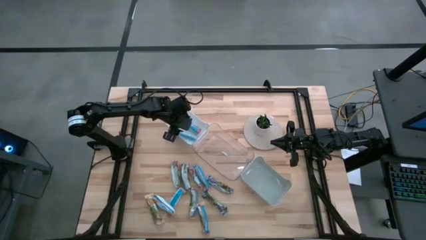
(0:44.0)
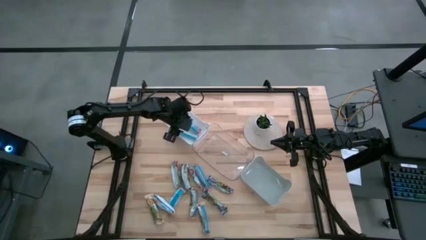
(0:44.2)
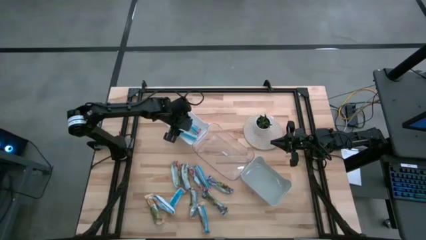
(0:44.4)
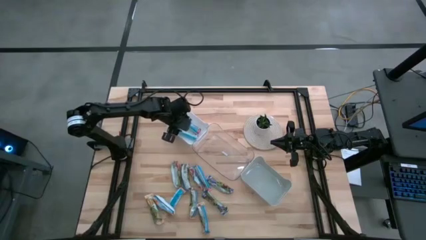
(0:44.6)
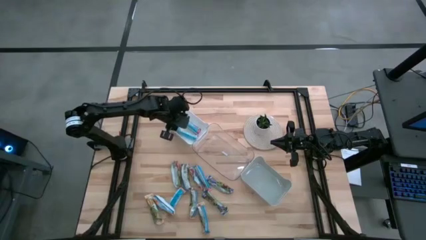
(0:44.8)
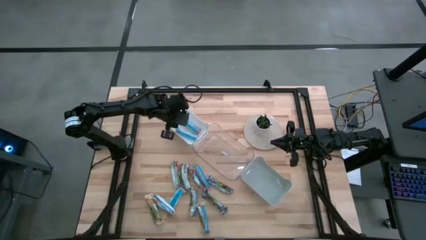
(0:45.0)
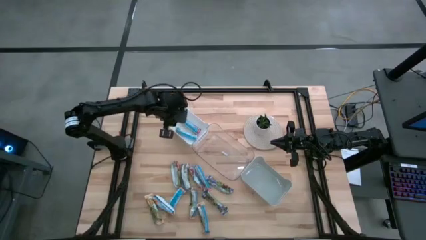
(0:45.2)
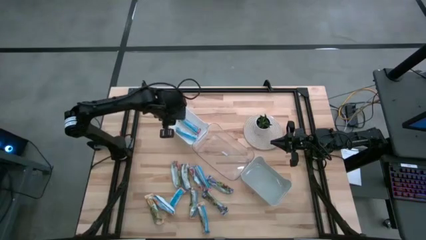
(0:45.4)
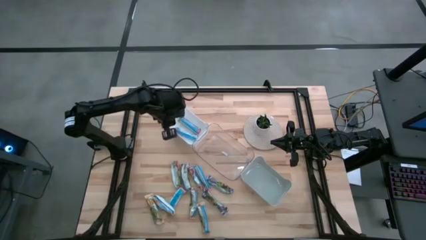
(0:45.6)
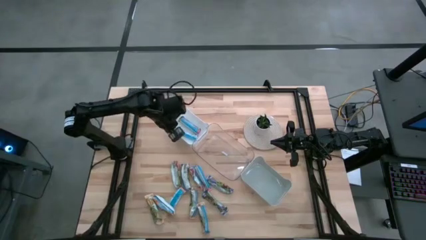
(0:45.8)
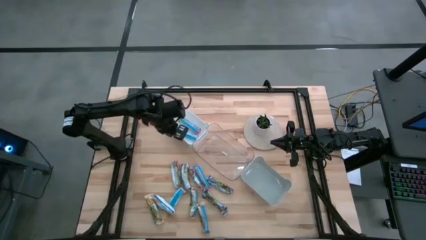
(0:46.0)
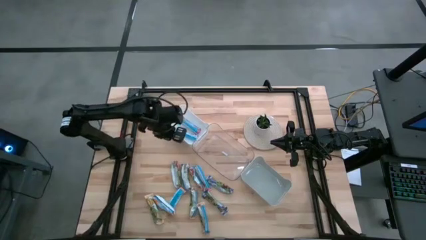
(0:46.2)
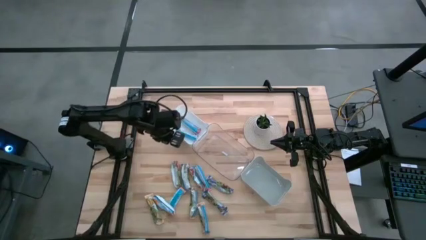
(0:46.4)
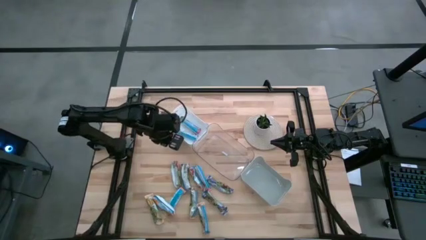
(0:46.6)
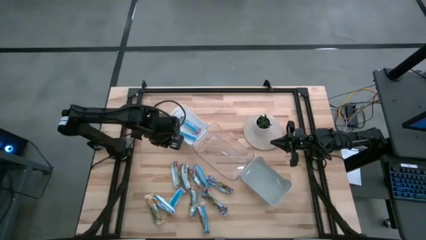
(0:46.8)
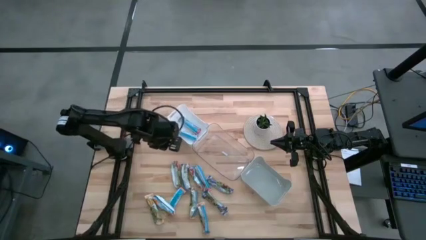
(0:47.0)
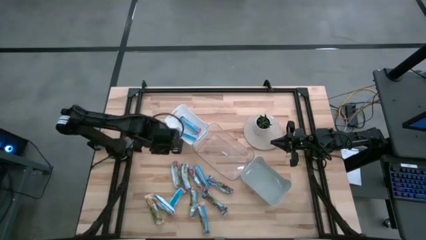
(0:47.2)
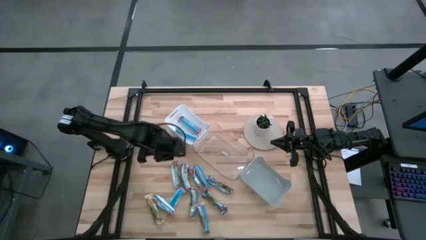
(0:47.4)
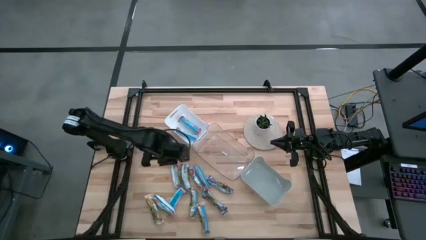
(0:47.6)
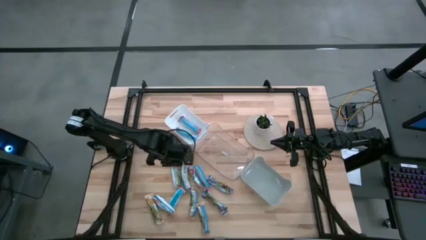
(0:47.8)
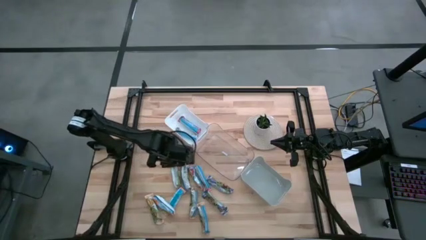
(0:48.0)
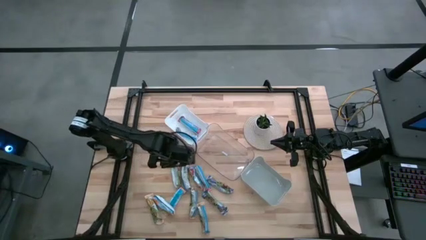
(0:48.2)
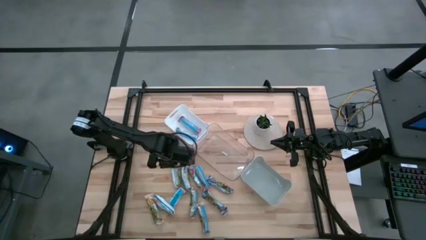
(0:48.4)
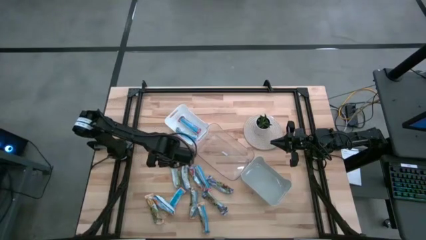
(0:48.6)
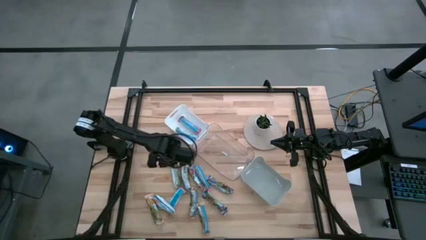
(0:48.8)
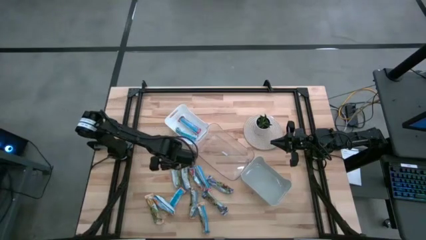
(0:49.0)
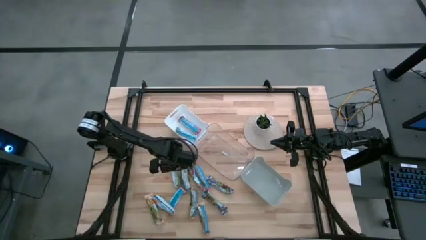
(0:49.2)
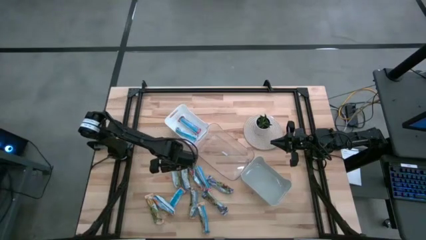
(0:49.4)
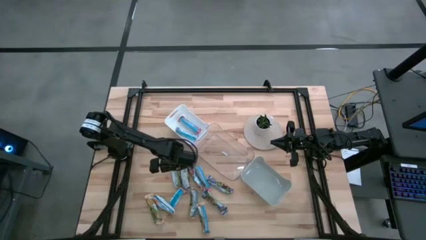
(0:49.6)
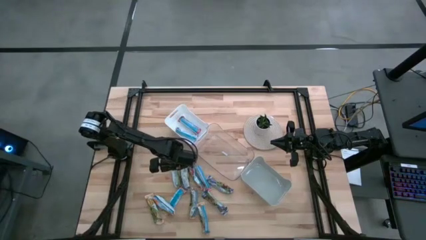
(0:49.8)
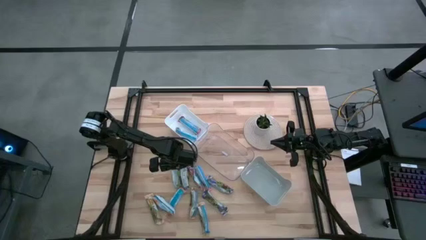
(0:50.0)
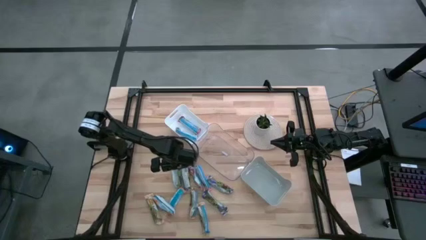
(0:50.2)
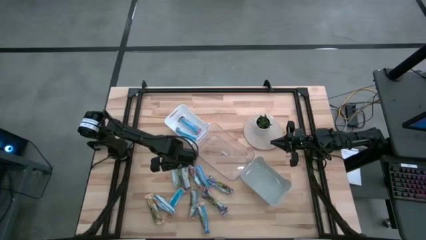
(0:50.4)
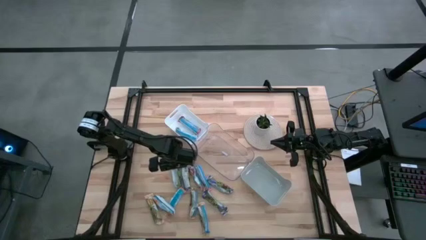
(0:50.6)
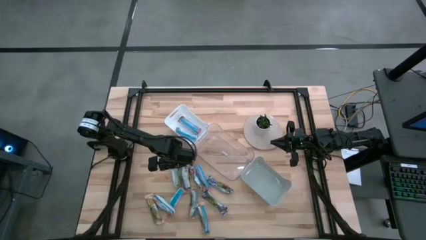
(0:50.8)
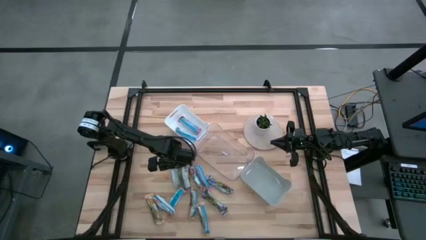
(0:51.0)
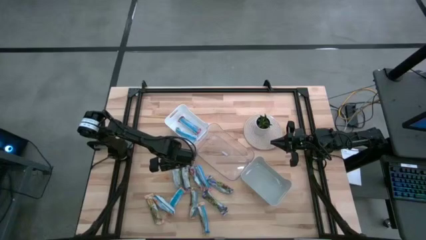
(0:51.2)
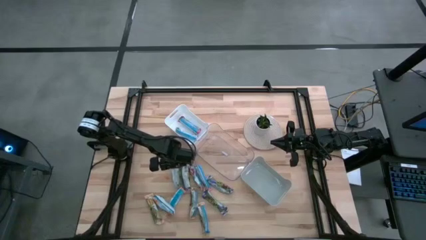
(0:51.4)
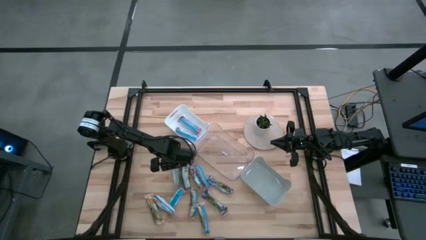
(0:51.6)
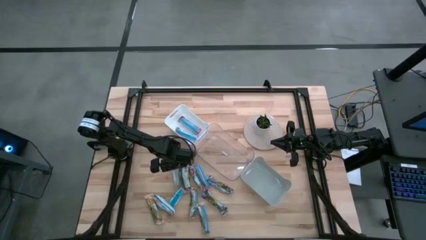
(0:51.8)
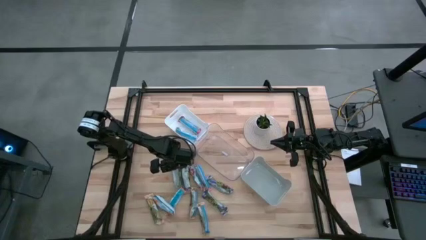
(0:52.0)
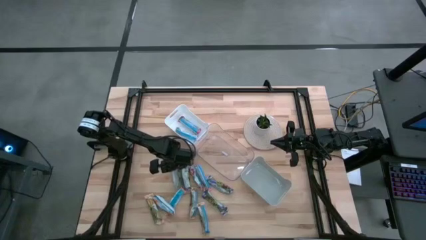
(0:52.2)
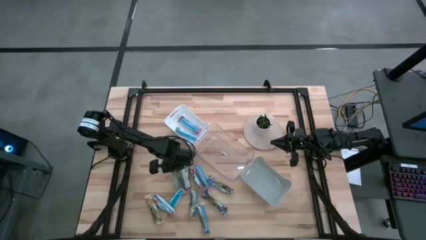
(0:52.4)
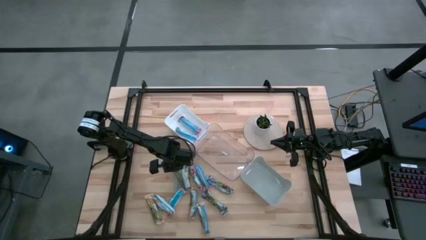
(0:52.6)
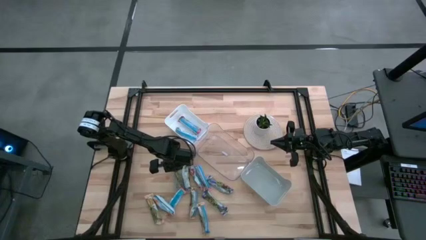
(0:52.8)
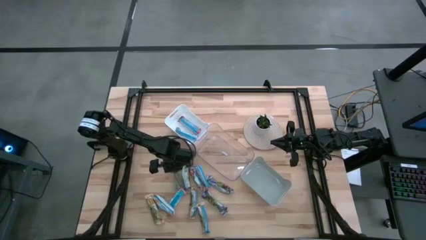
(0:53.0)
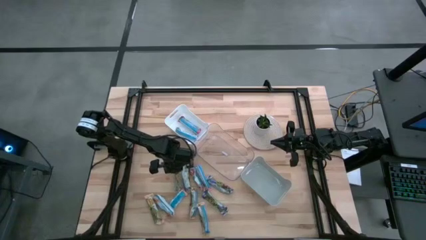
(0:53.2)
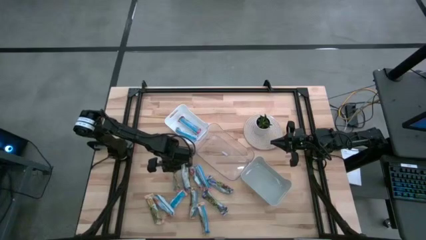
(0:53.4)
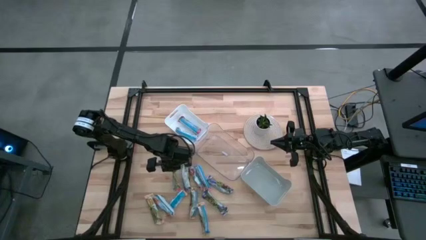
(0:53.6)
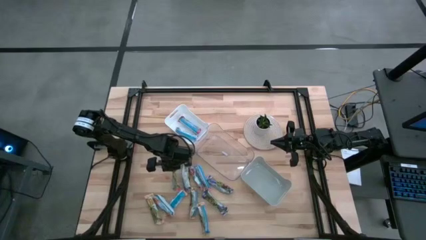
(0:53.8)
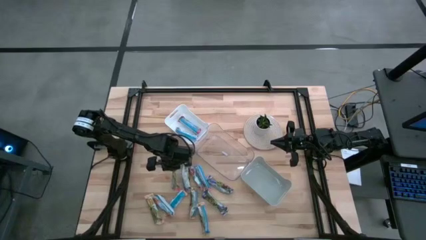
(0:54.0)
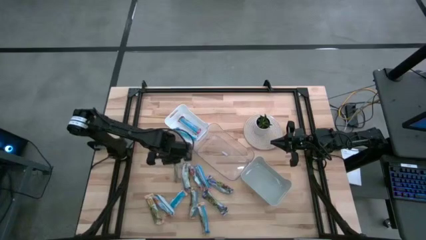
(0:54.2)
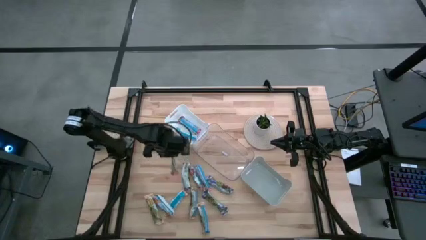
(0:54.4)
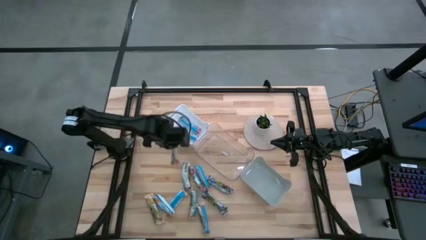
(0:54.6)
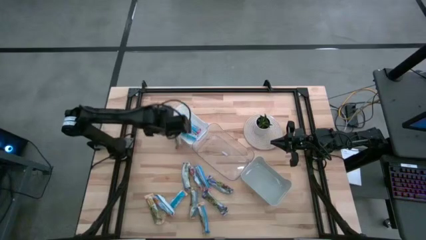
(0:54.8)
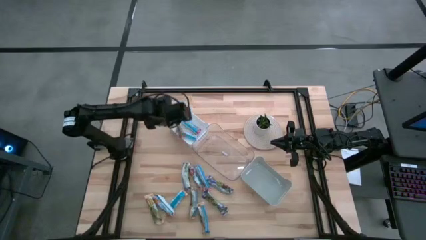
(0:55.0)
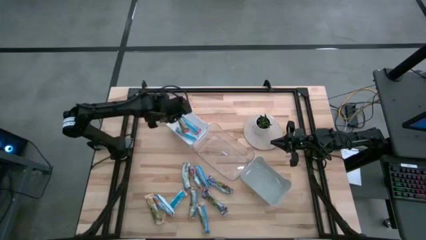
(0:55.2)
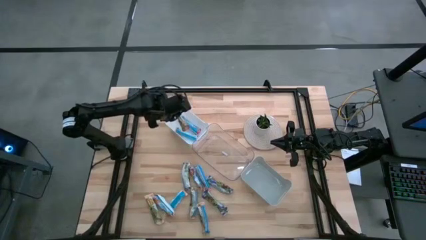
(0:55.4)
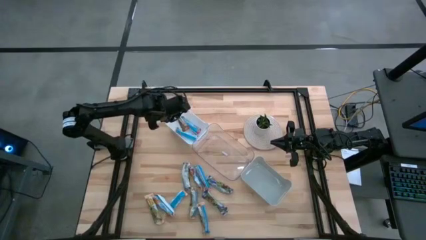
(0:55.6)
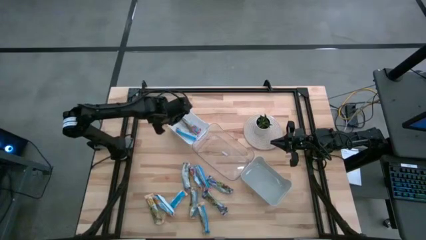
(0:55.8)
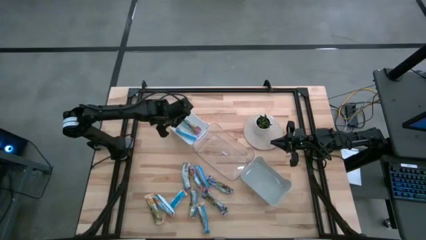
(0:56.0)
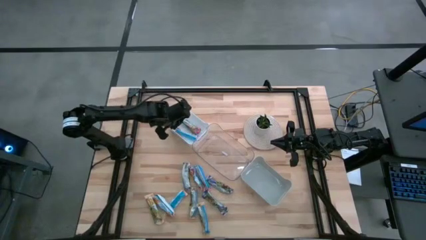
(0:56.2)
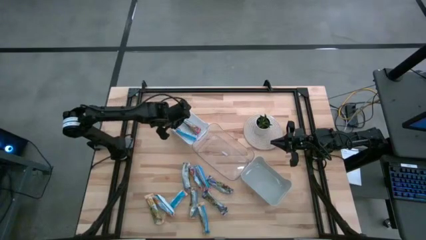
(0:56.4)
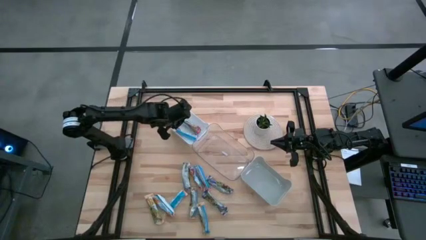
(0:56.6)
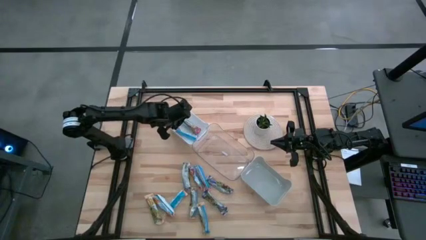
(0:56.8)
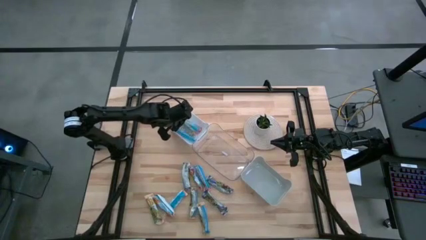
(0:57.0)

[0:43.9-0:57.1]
Task: Pick and place Granola Bars by type
Put the red granola bar into the white bin

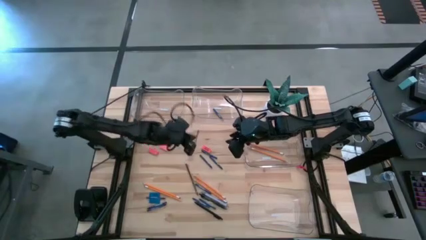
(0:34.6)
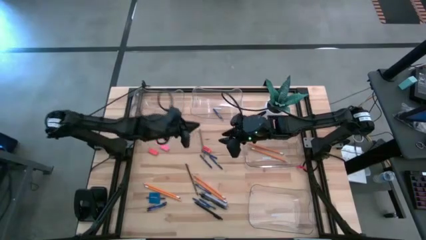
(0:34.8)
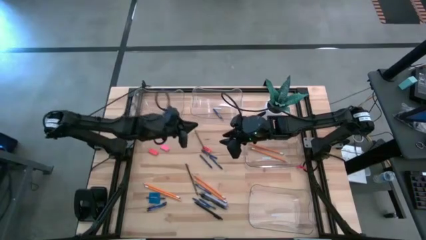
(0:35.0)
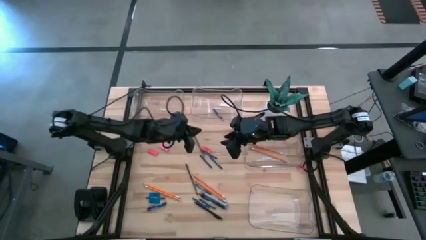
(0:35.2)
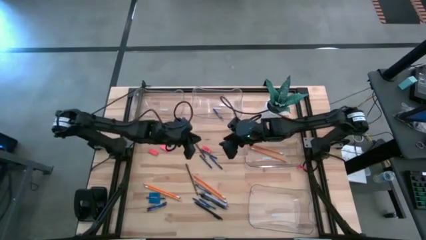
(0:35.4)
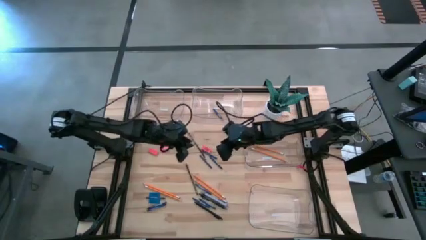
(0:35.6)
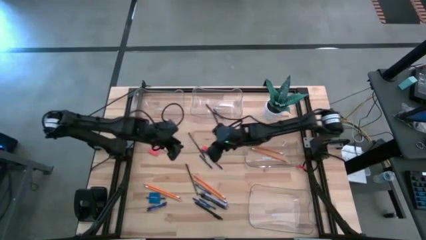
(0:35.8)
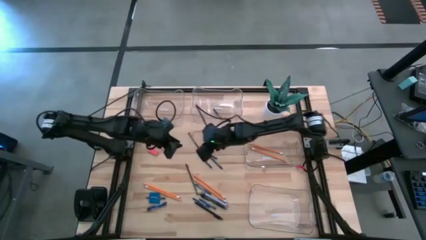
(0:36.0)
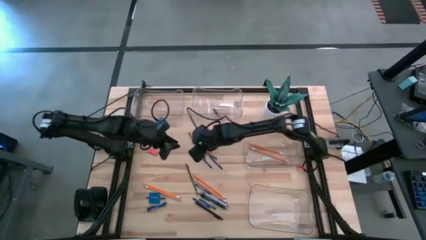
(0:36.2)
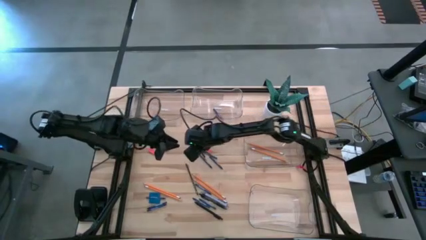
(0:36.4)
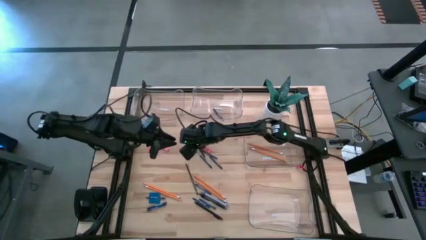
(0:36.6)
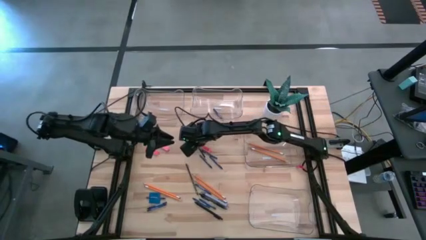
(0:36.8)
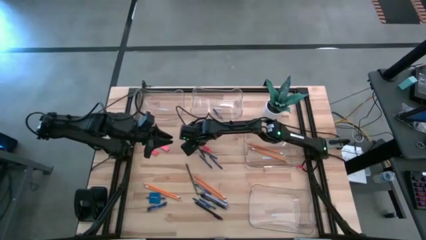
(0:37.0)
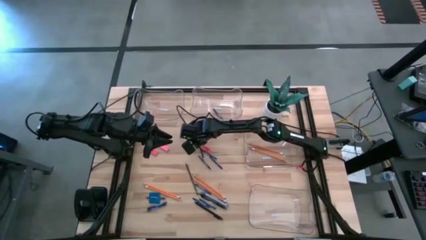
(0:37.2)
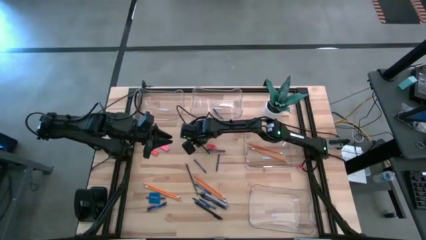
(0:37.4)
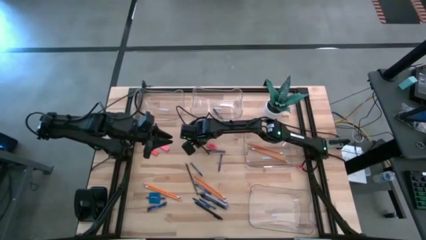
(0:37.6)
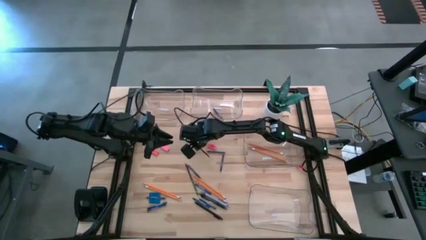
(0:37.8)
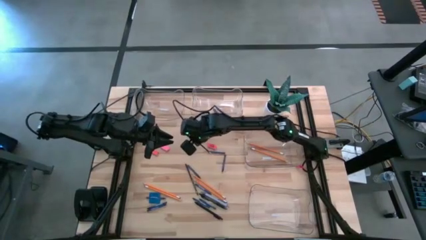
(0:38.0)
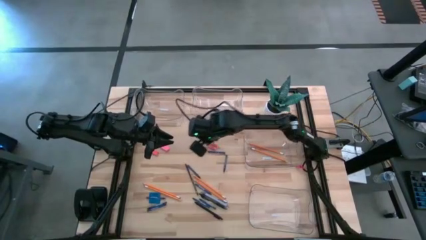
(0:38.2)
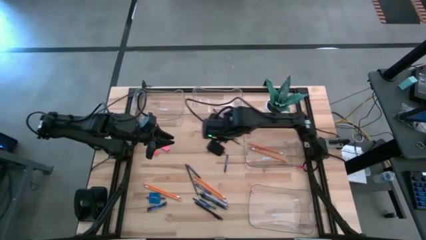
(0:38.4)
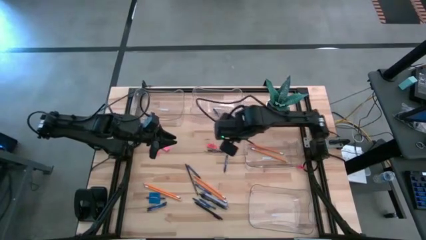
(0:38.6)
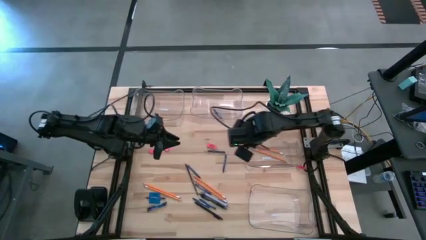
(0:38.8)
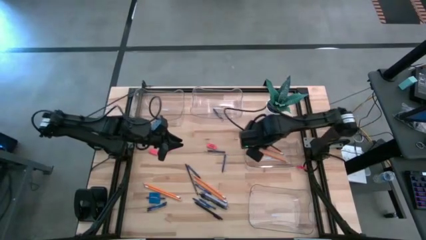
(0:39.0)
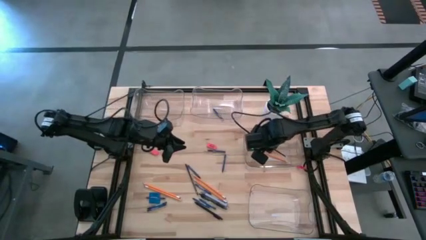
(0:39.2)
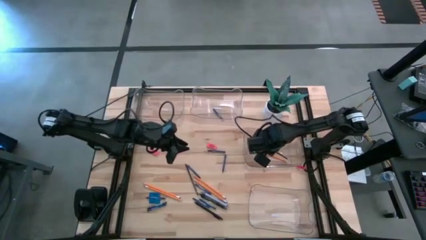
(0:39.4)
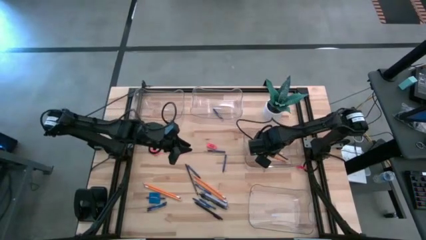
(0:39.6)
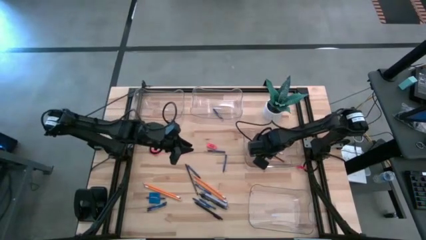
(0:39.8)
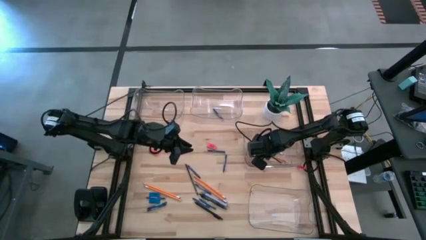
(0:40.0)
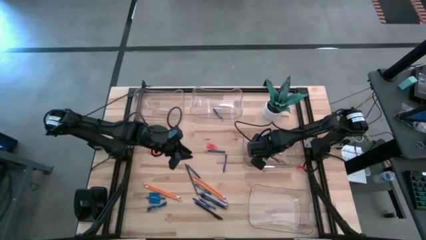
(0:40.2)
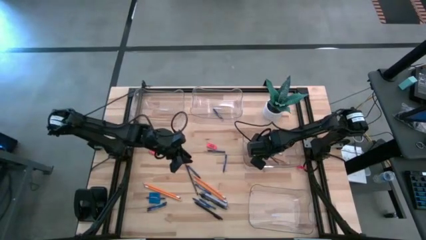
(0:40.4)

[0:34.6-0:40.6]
Task: Sort crayons/erasers/pens/pencils in bins
Put the black pencil into the middle transparent bin
